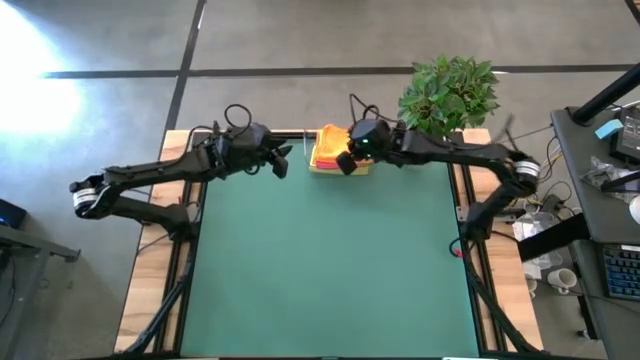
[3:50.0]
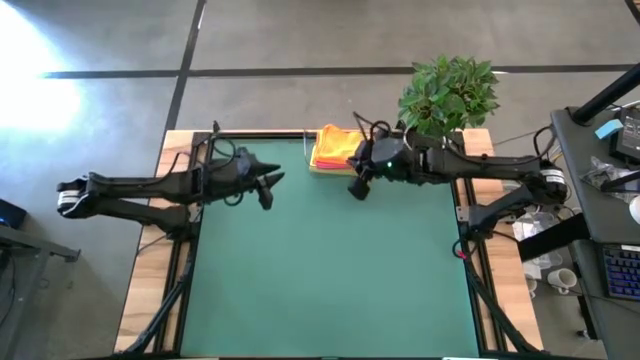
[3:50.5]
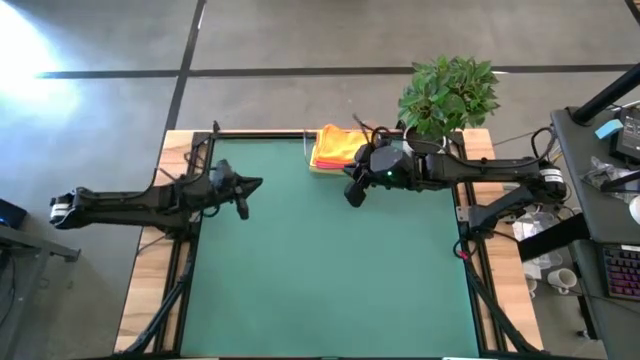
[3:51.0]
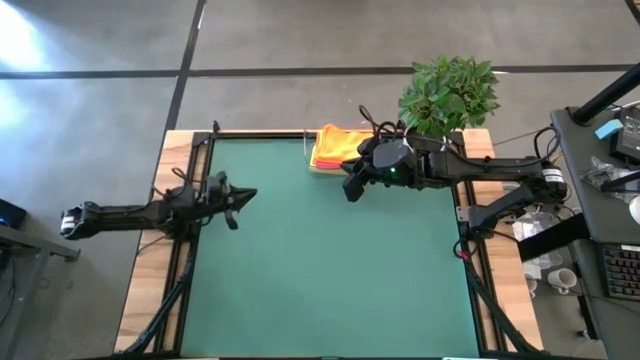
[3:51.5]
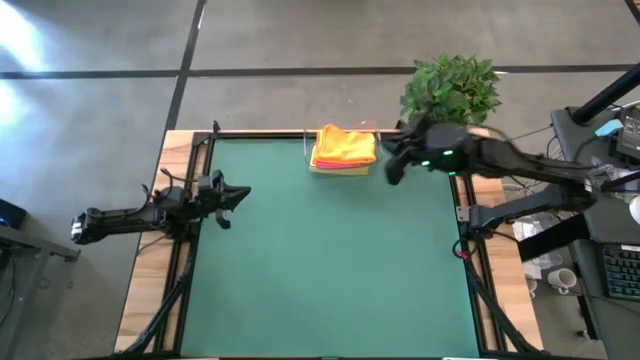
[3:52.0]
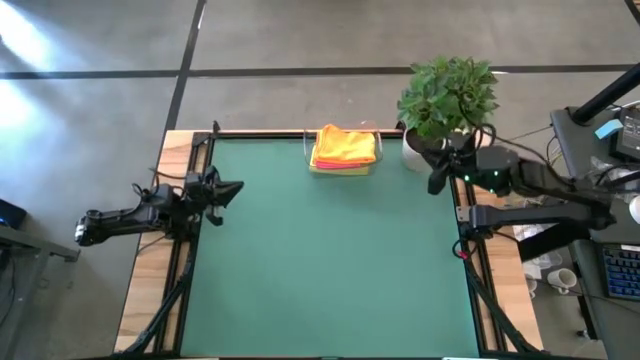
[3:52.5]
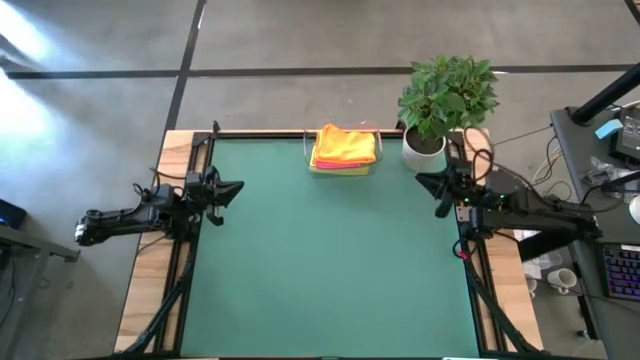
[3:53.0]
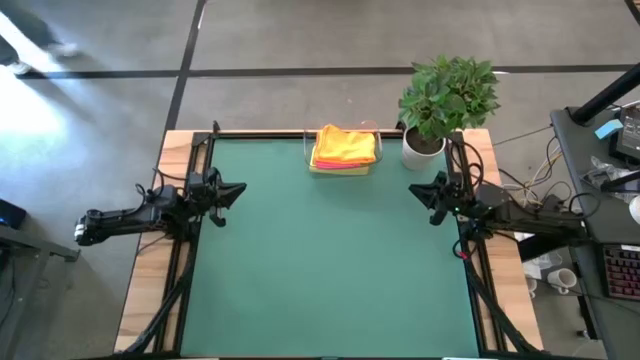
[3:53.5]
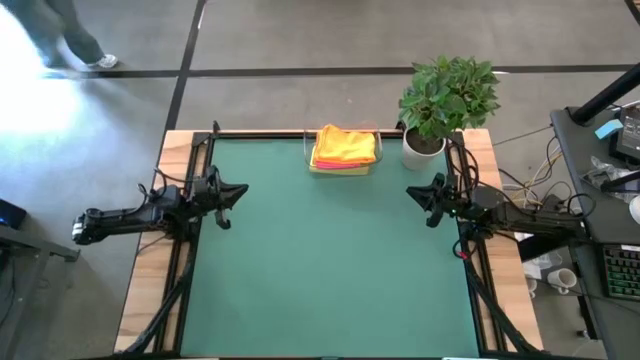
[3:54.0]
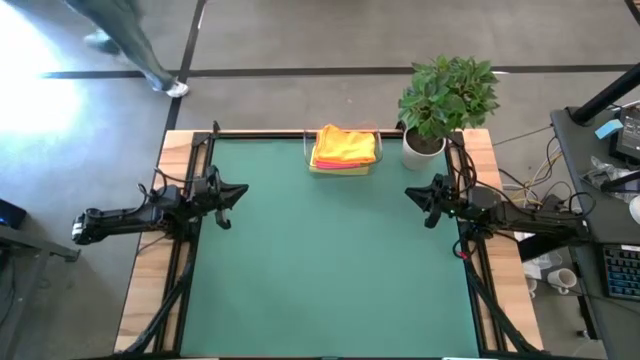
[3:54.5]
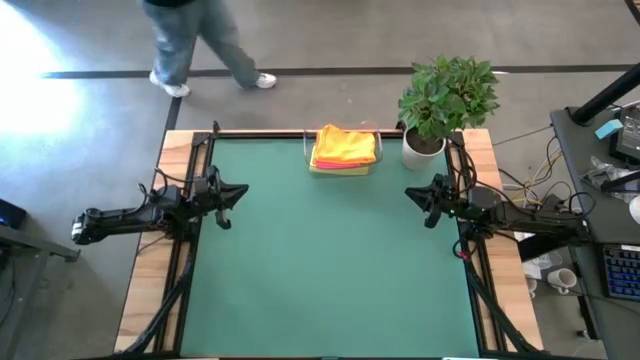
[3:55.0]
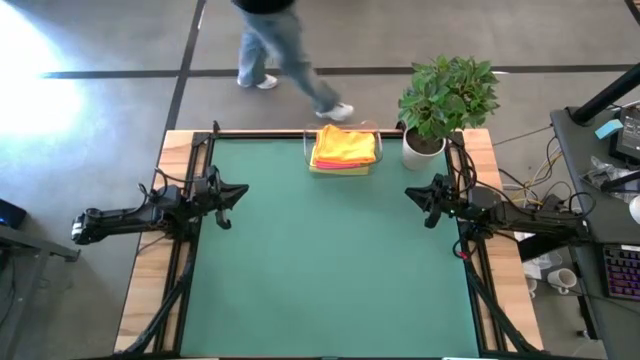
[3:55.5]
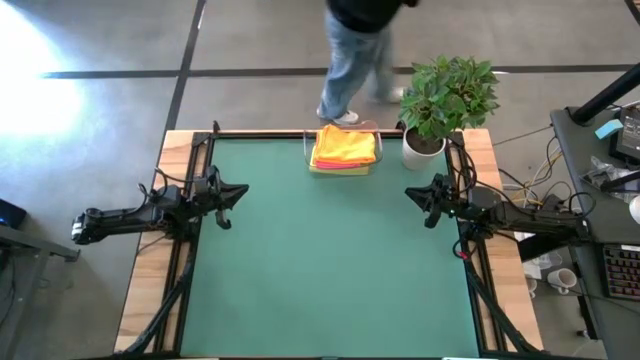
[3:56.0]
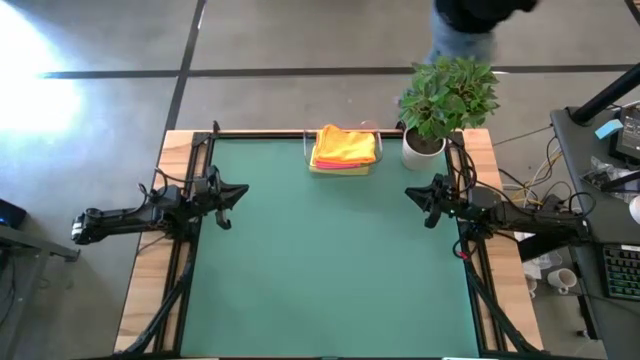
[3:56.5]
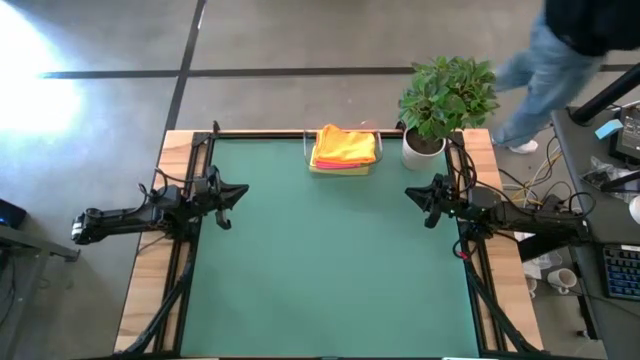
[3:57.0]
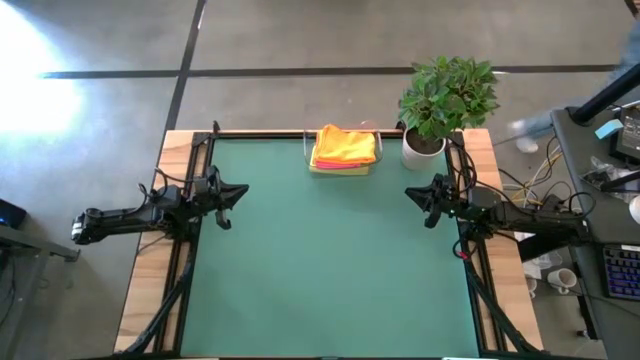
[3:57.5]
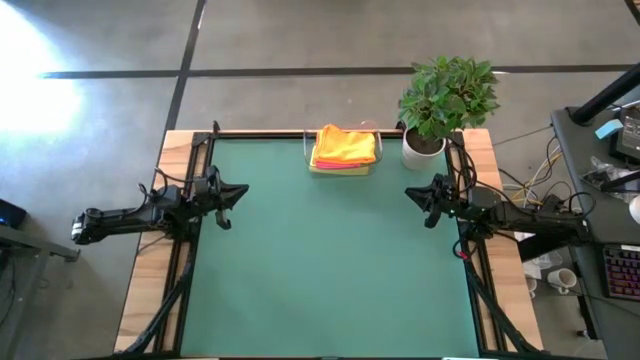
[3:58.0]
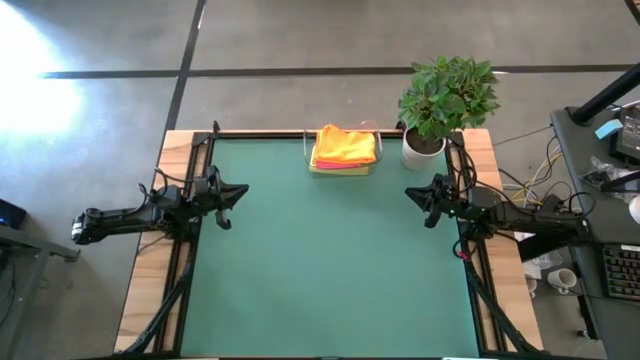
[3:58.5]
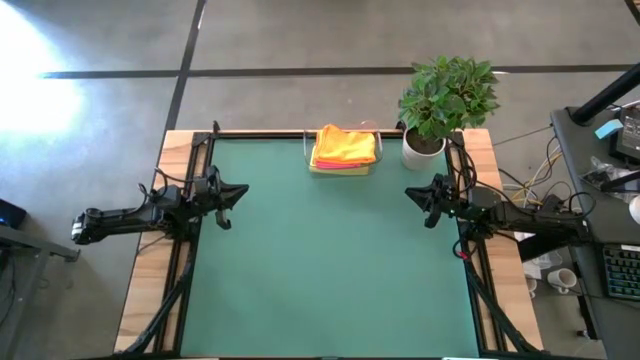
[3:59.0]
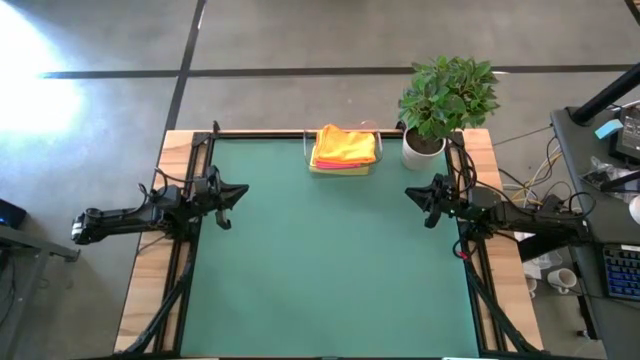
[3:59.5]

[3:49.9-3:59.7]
Task: Fold microfiber towels
Return to Home Position

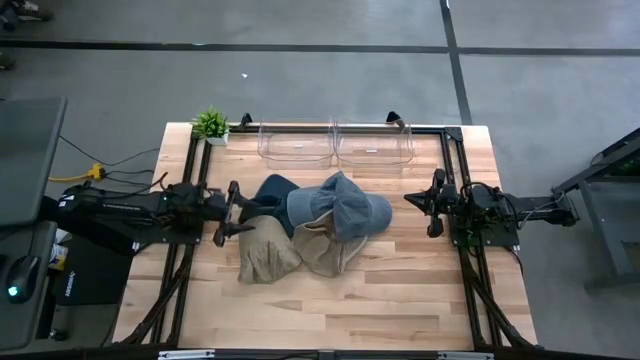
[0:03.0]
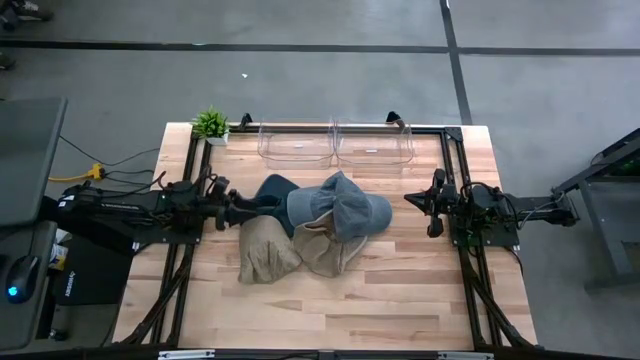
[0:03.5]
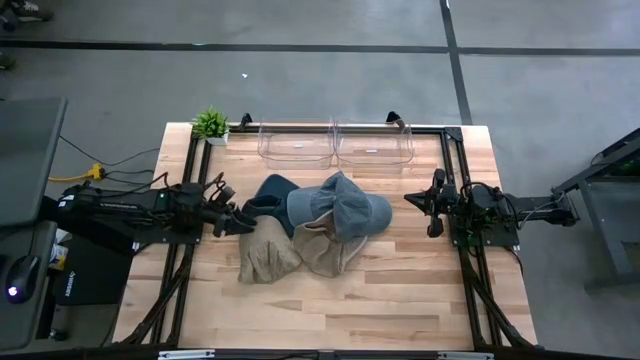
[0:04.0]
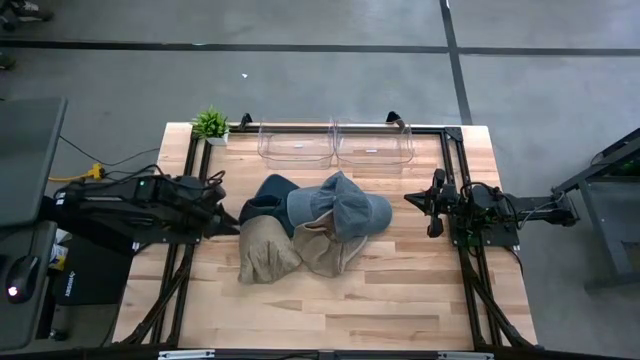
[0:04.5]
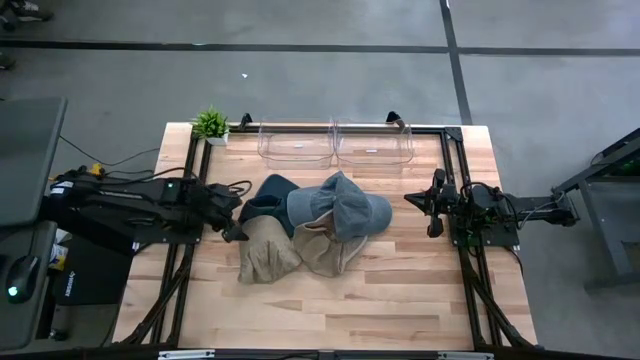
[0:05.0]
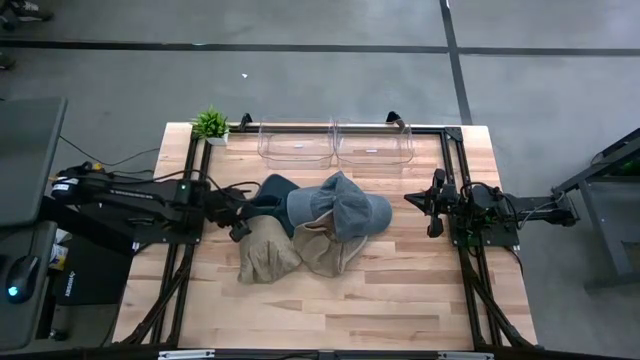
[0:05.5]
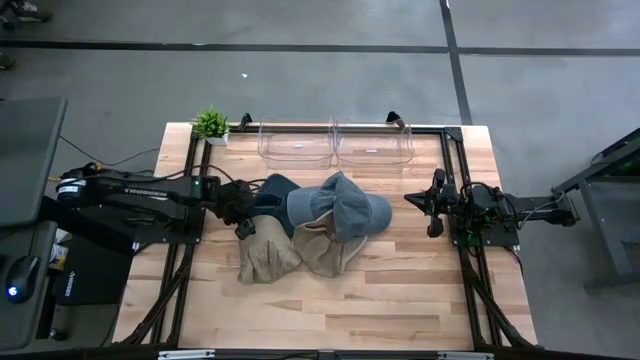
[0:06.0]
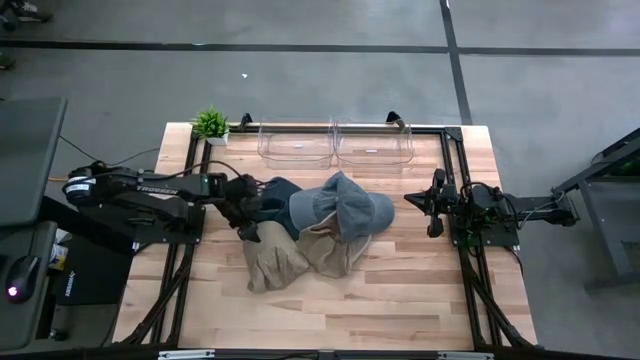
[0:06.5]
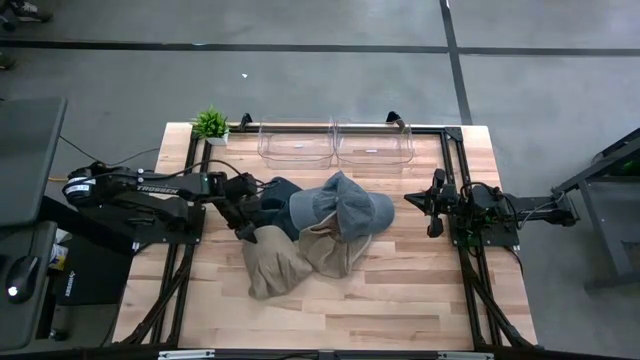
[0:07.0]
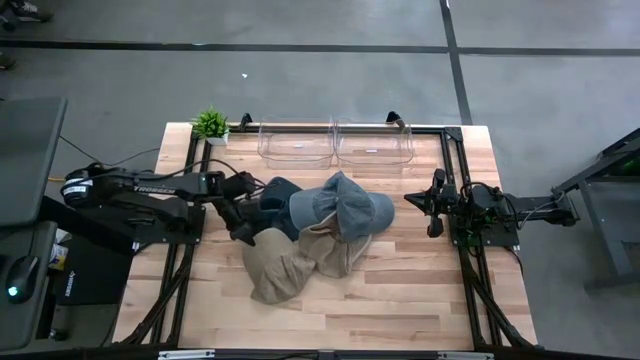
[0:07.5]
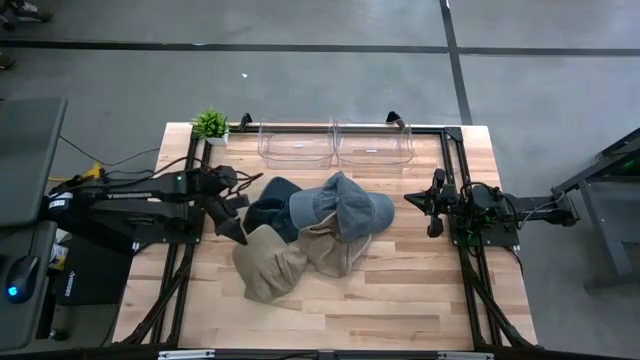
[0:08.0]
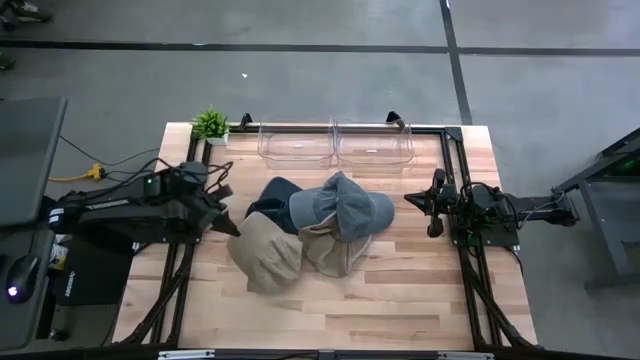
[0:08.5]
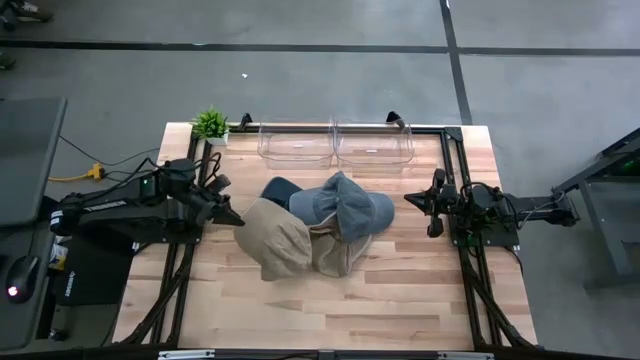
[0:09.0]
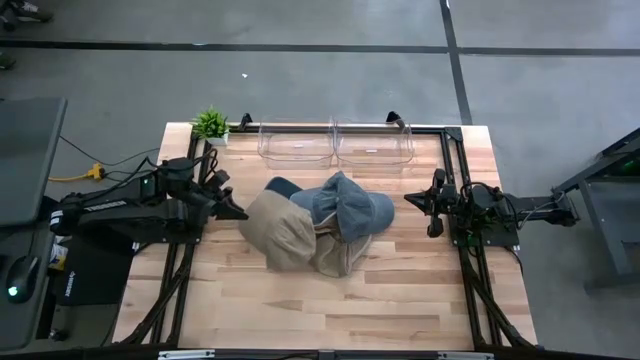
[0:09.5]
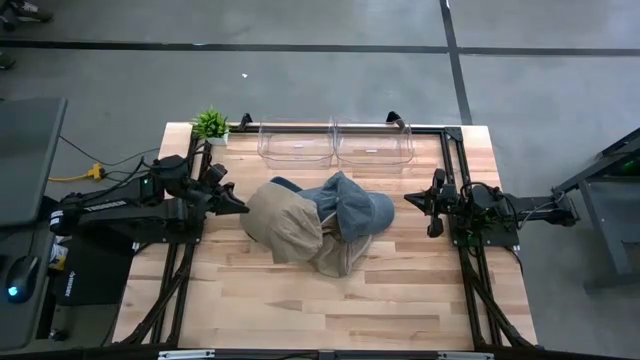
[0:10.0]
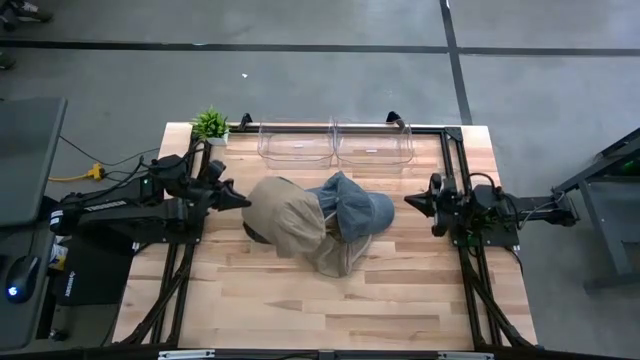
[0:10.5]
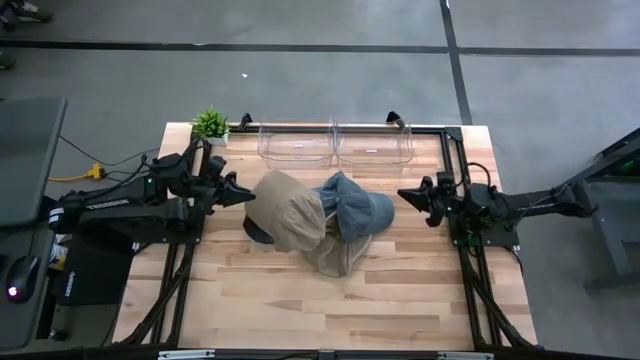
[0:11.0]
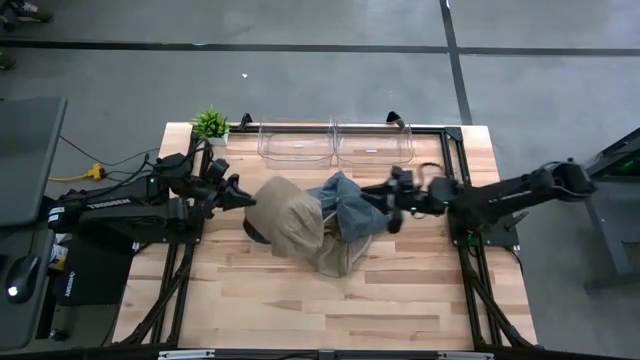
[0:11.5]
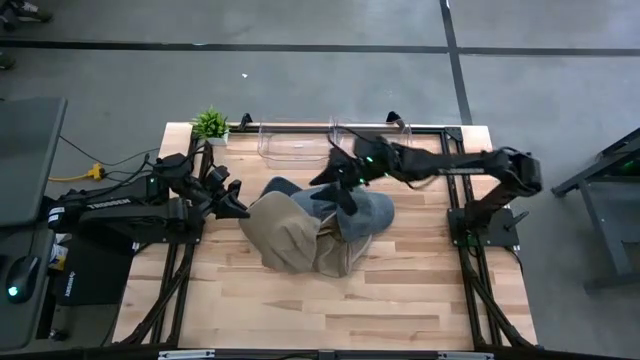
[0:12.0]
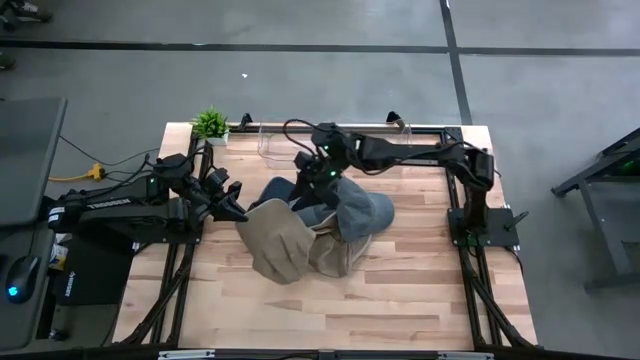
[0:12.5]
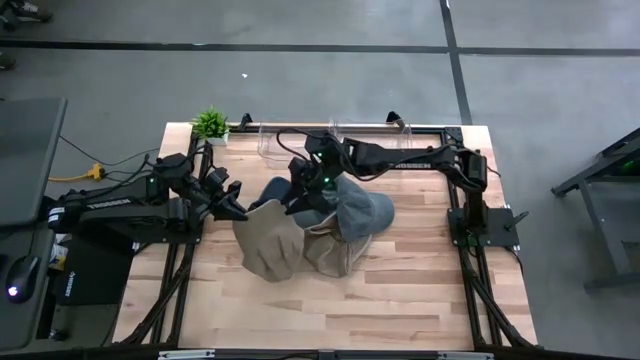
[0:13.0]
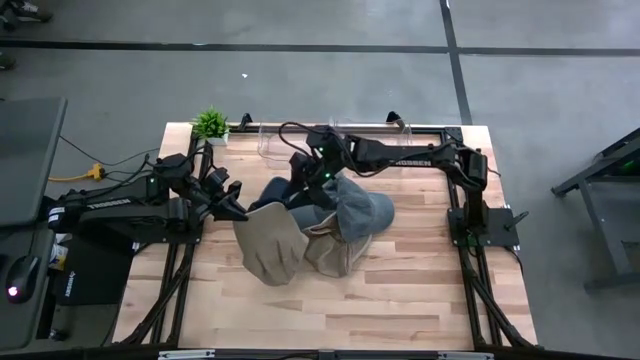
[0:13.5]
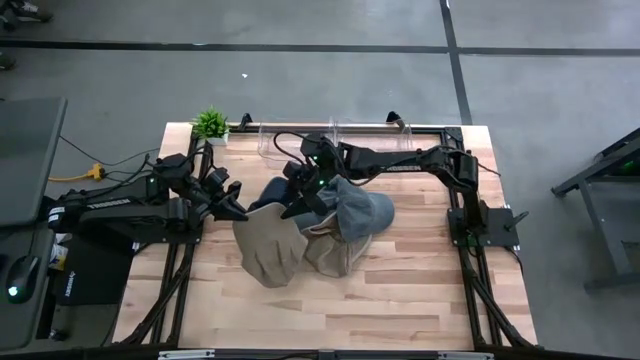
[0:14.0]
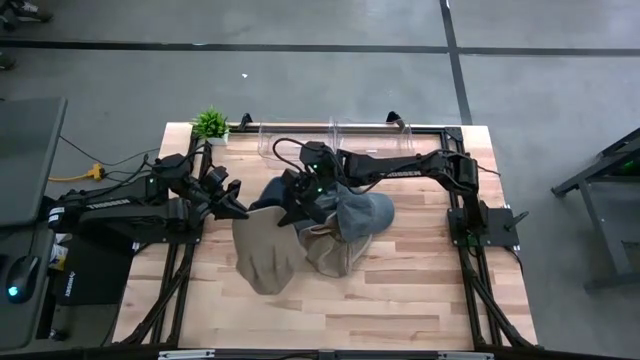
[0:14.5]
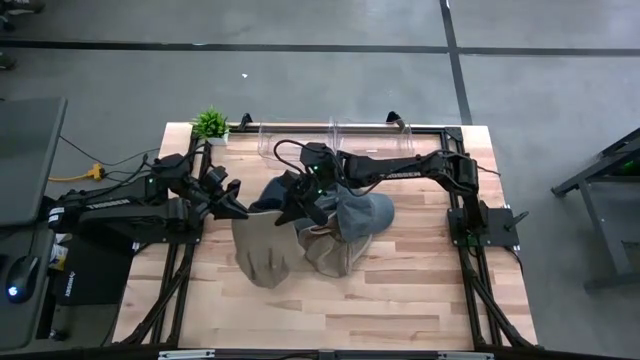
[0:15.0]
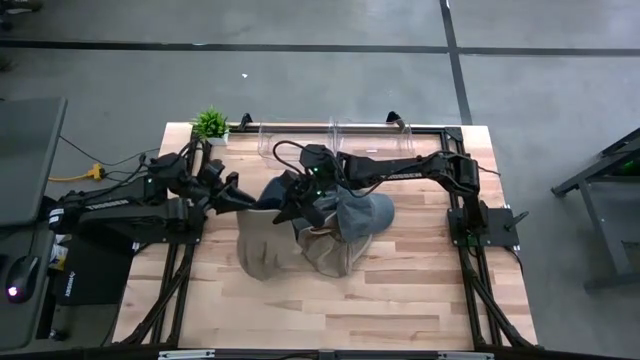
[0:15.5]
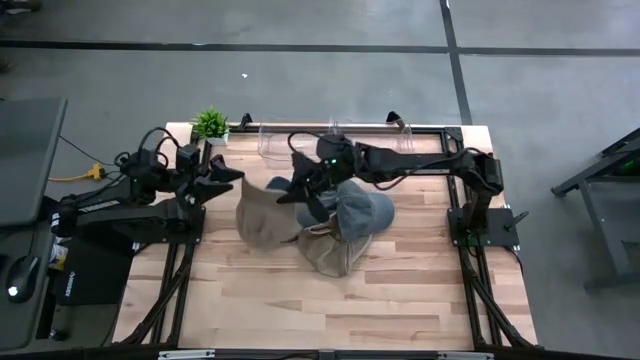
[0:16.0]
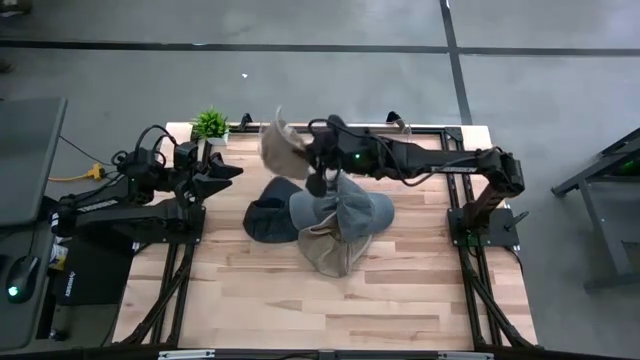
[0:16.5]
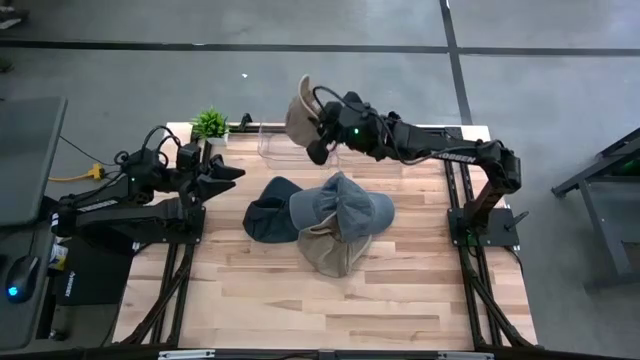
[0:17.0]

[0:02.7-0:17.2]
Task: Pick & Place hat
Put the left brown cap into the left transparent bin
